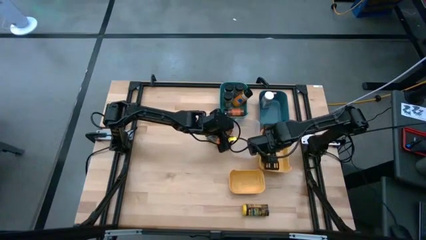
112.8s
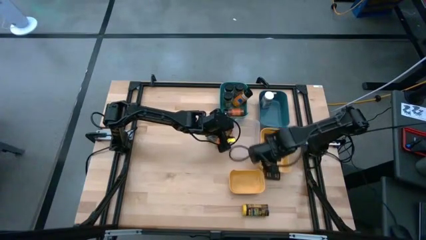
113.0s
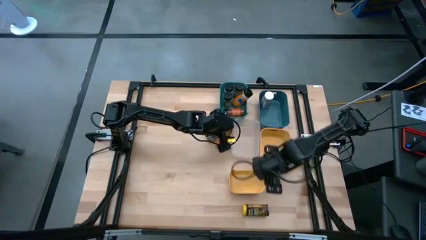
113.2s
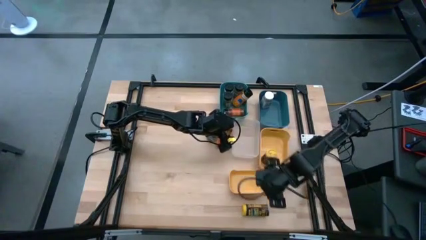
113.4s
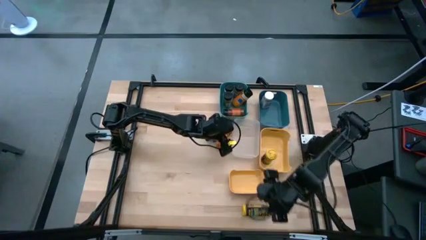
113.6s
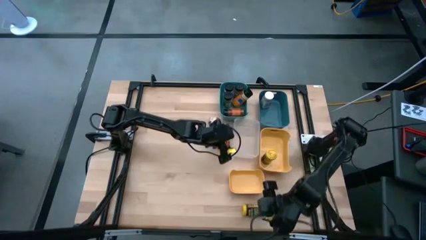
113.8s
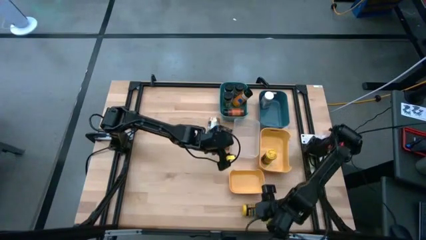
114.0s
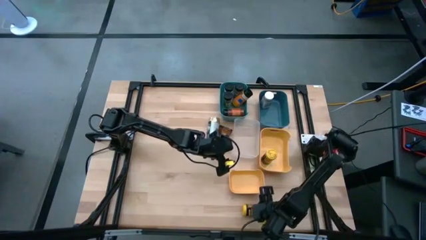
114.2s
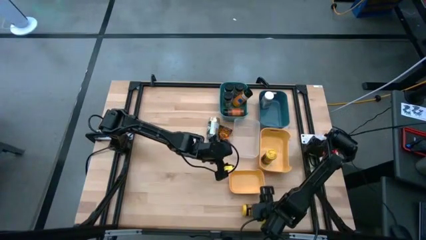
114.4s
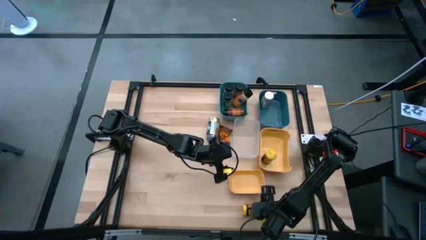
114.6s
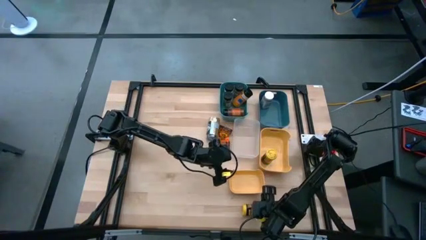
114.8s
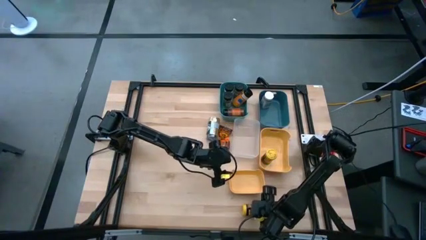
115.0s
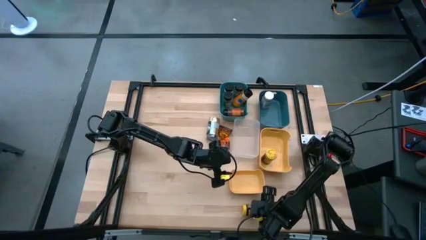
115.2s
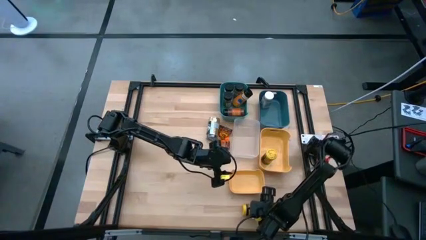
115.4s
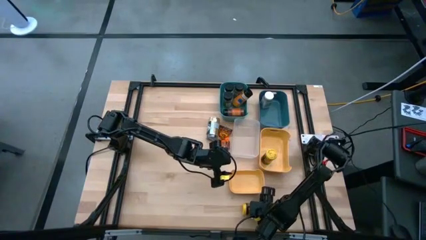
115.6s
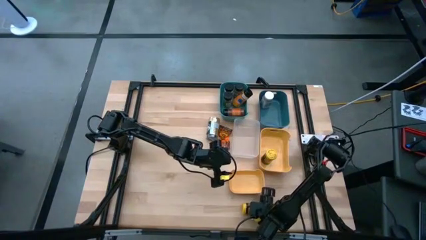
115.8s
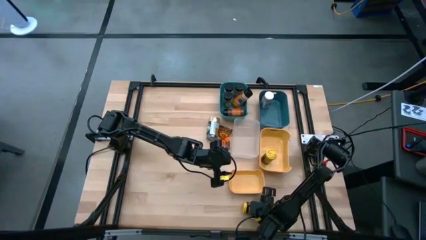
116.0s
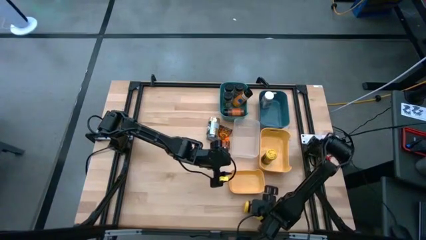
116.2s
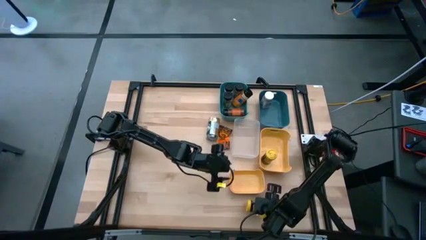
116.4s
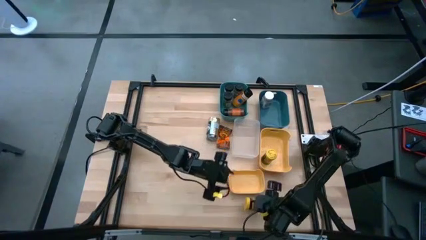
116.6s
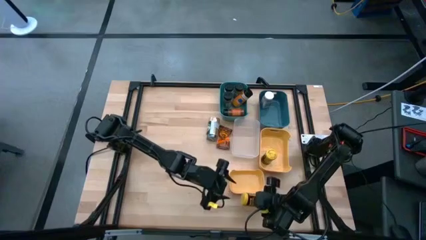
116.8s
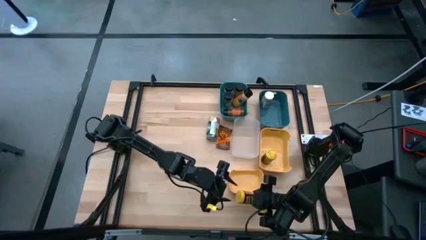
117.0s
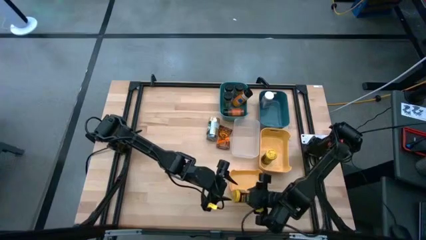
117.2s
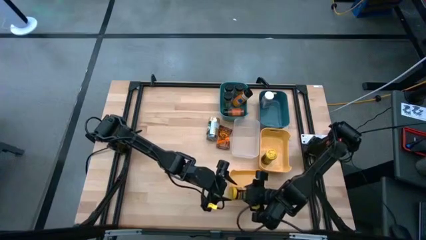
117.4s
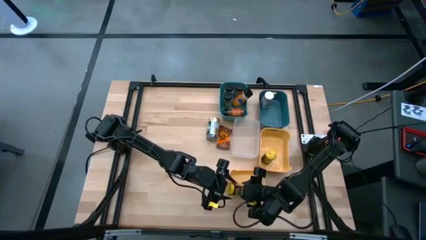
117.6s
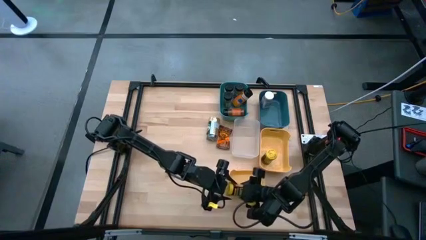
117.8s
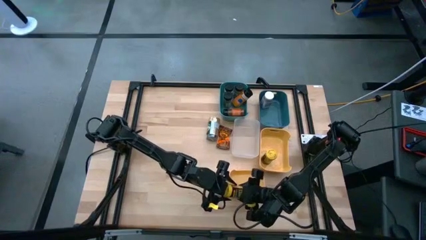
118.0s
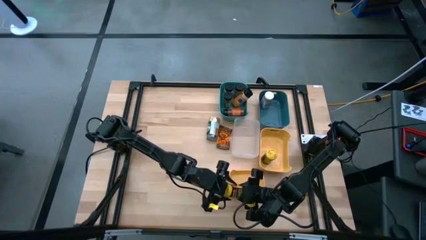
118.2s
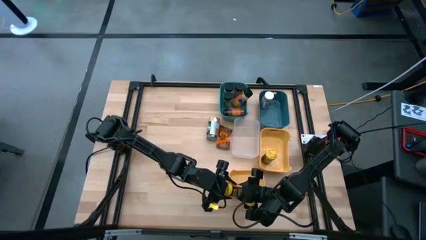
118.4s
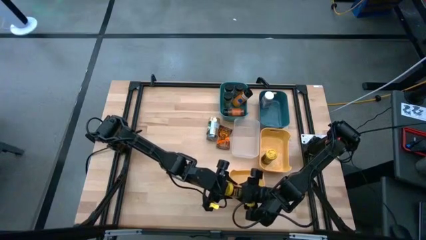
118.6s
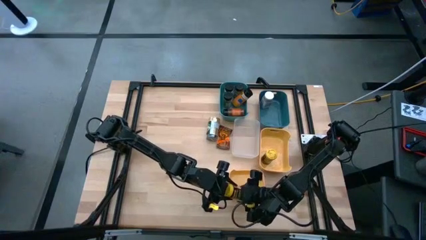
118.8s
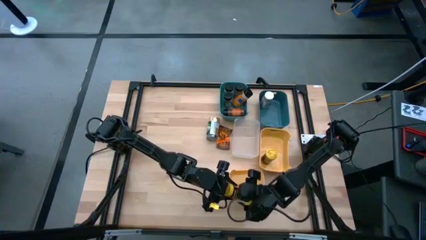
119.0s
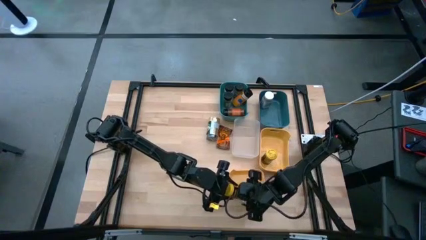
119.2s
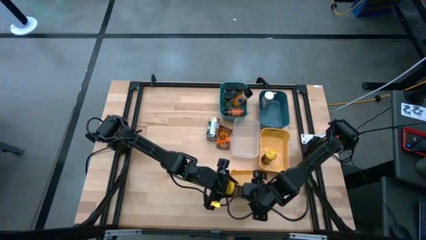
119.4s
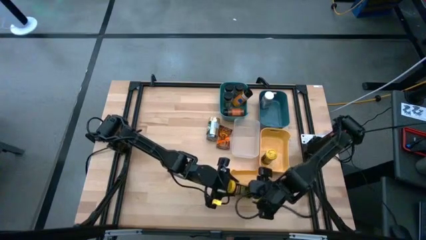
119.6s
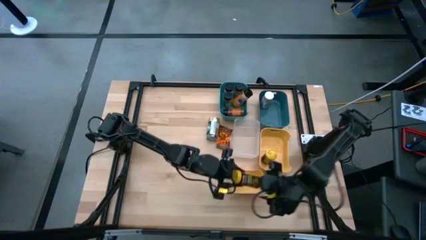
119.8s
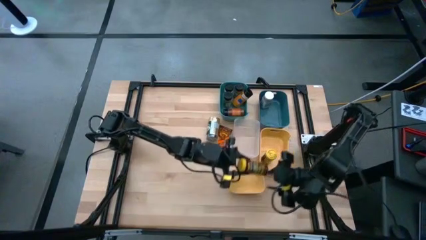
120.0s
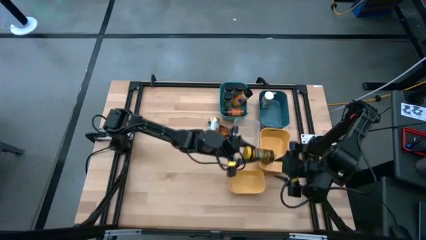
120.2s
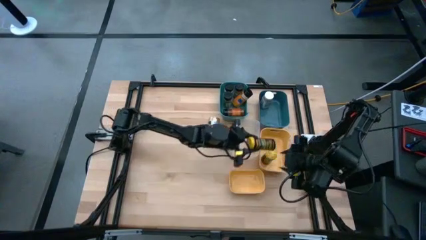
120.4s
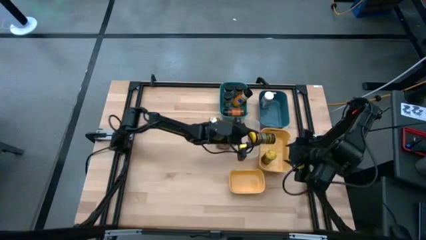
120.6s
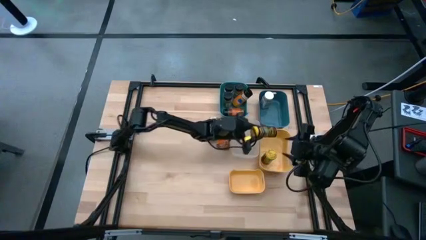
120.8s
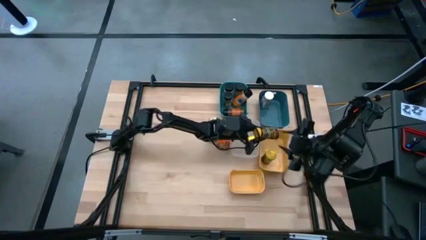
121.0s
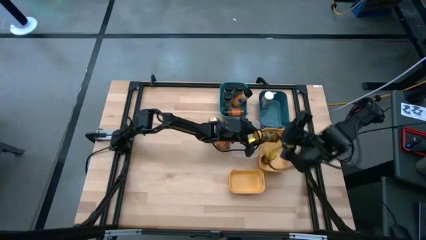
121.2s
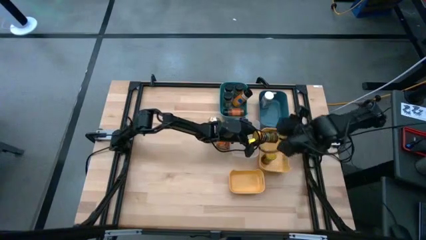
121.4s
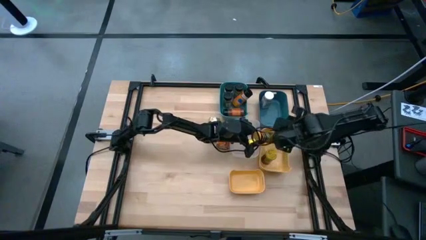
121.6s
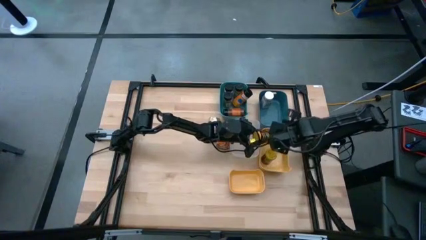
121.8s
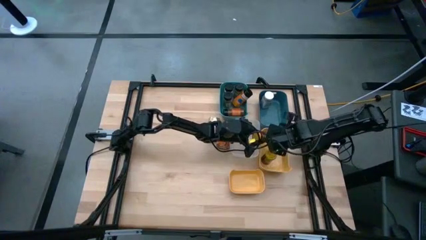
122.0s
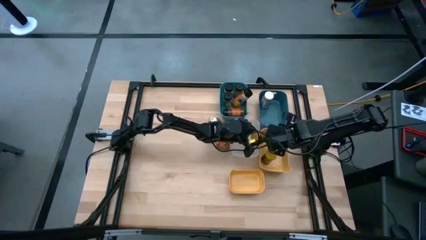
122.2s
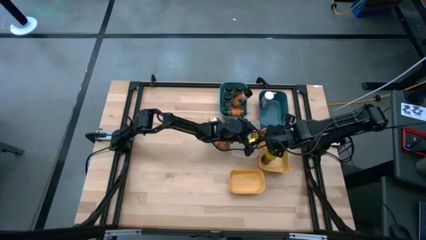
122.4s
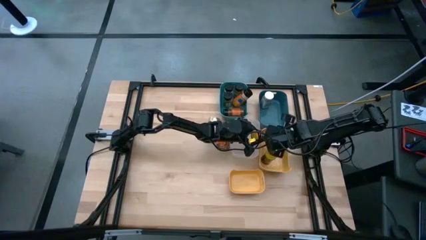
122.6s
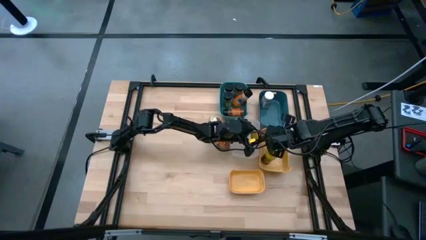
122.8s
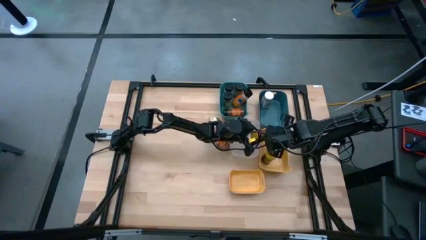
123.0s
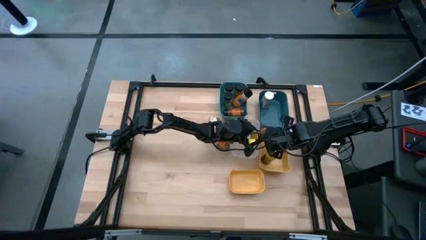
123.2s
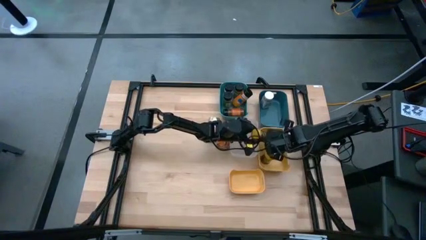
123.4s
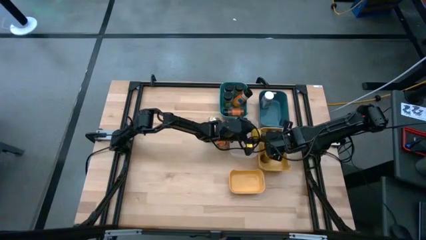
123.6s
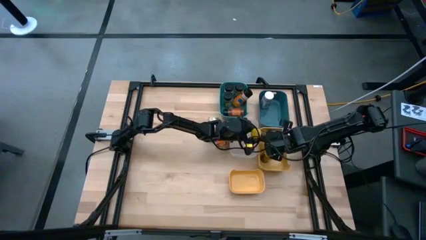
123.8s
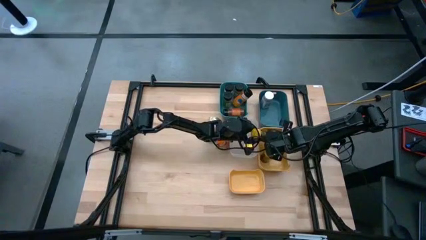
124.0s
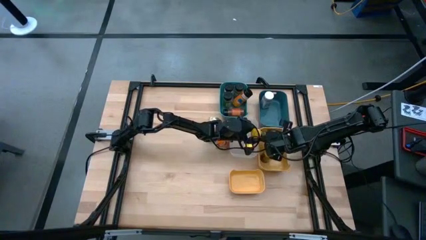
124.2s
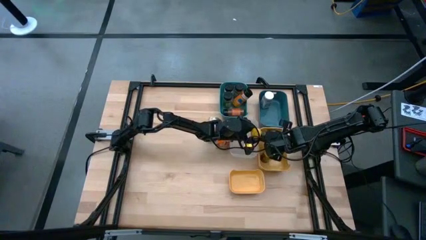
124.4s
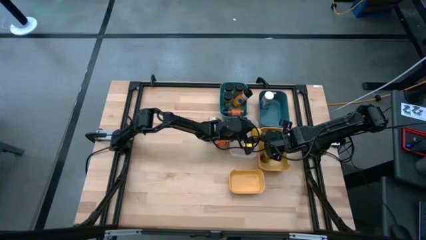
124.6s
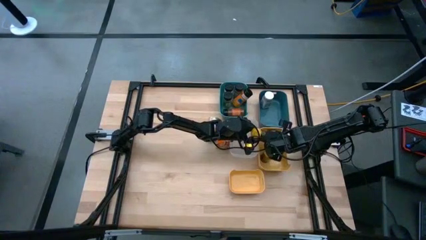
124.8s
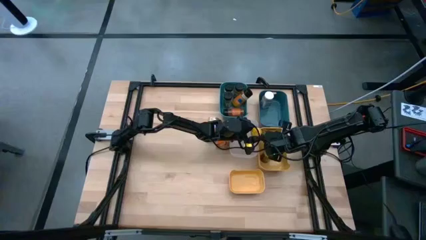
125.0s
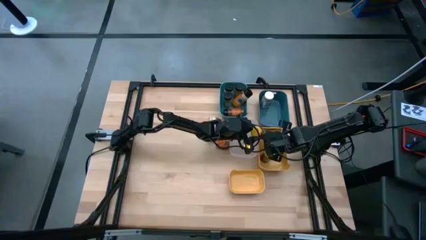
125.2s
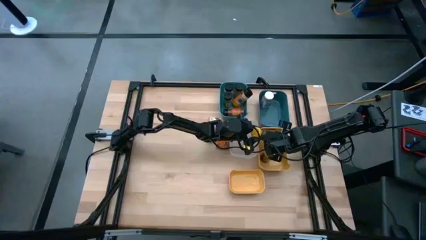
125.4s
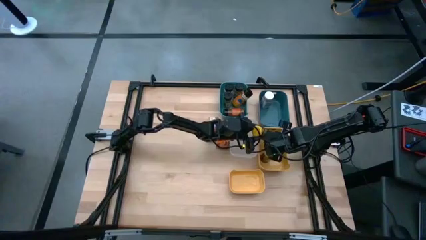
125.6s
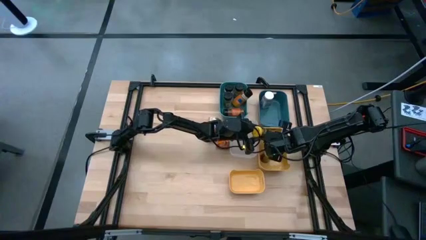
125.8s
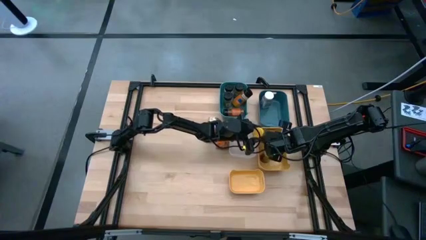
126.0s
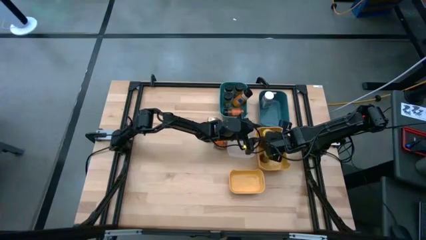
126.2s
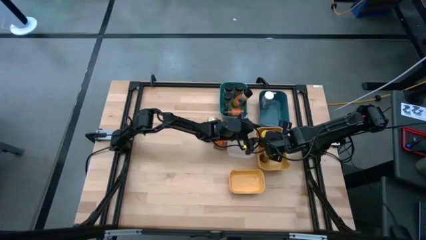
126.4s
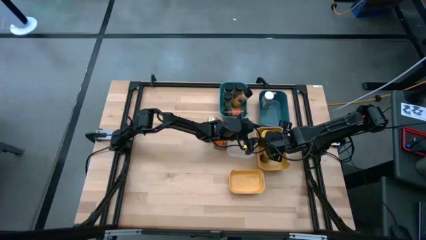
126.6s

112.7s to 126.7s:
Task: Sort spices by type
Put the yellow seasoning into the big yellow bin

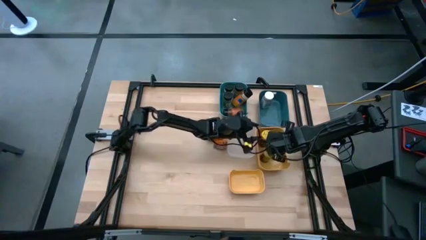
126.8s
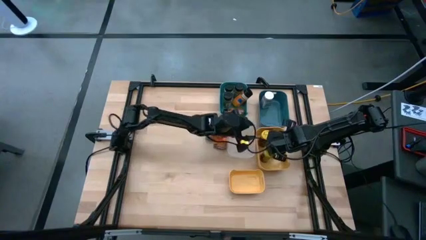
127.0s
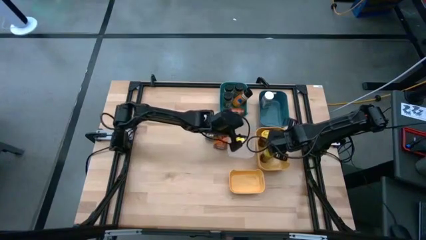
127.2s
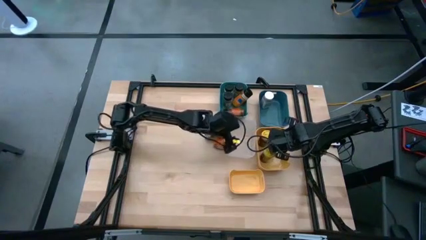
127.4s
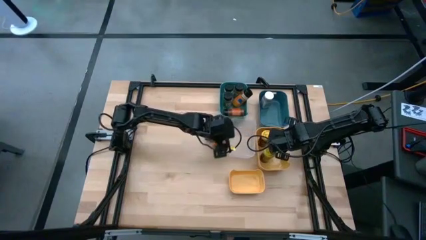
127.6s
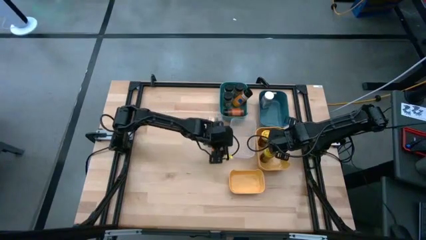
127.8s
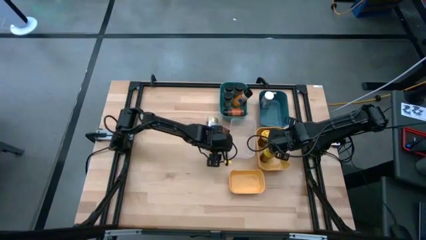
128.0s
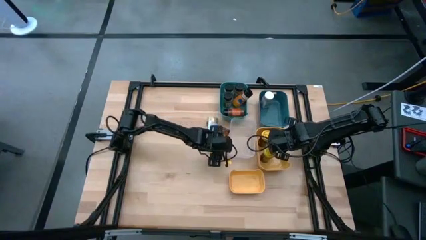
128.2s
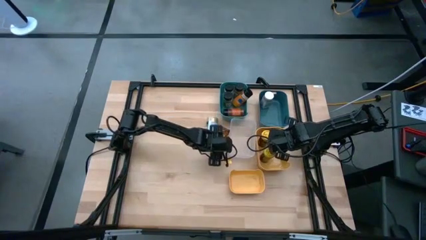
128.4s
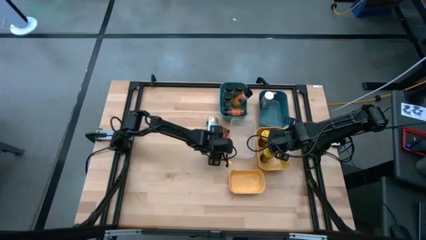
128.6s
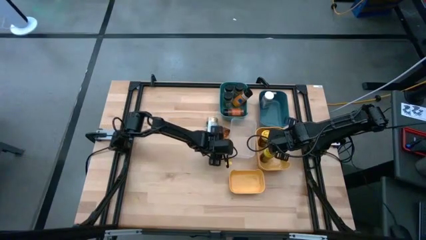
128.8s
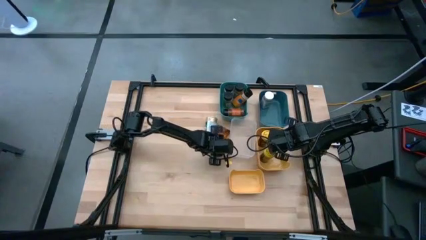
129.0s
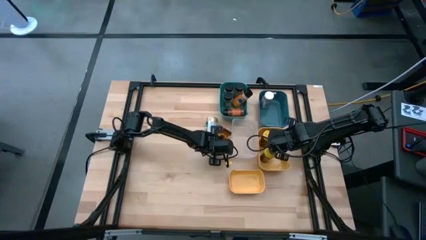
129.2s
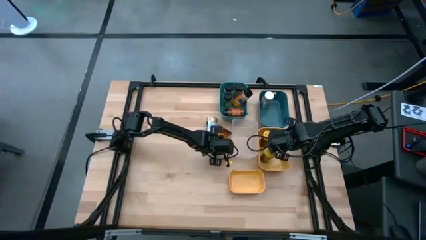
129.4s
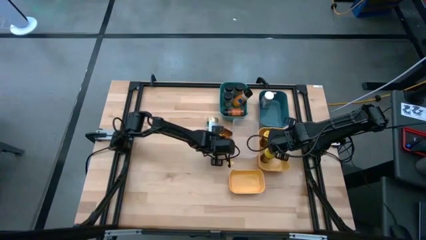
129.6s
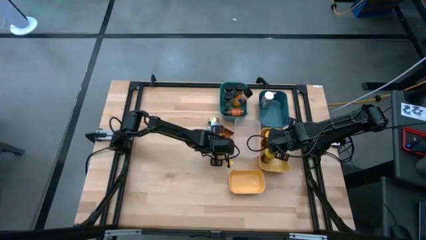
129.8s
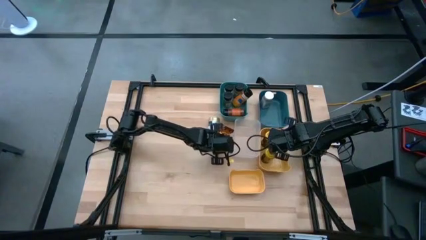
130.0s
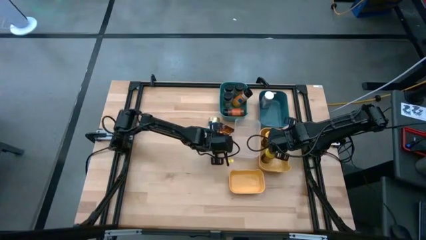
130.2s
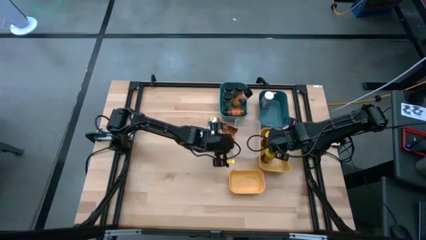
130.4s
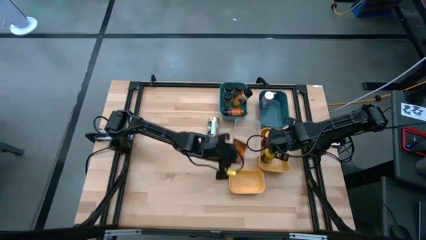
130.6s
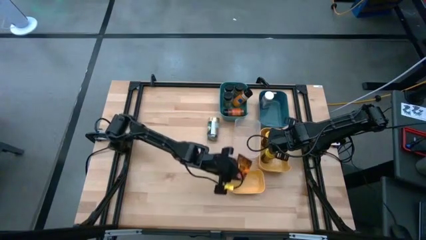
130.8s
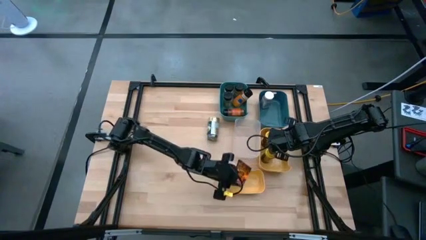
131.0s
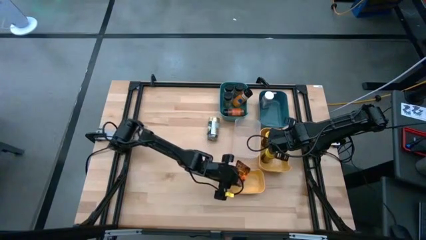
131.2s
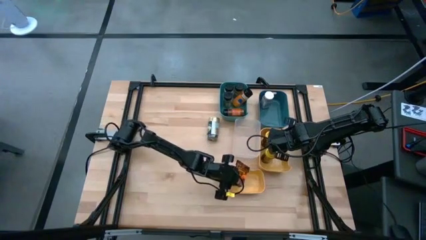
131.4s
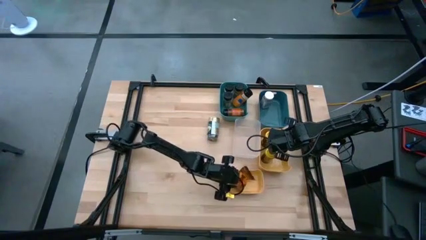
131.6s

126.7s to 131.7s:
Put the orange seasoning into the small yellow bin
